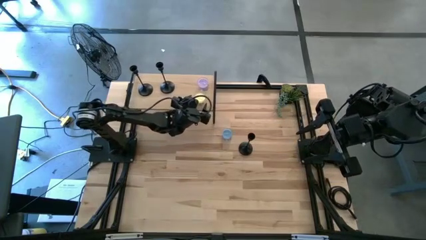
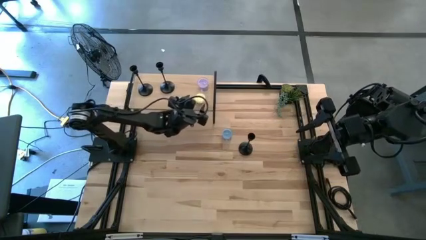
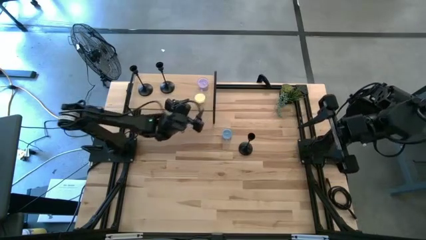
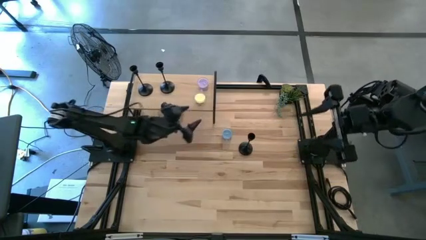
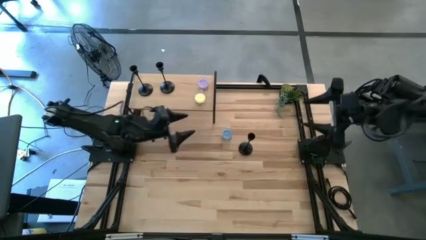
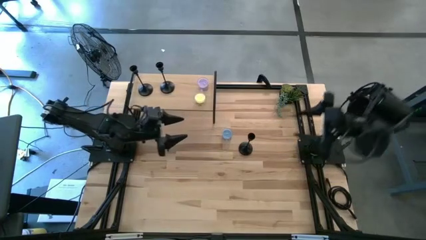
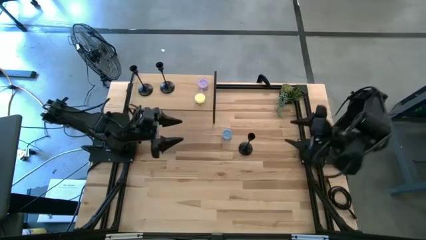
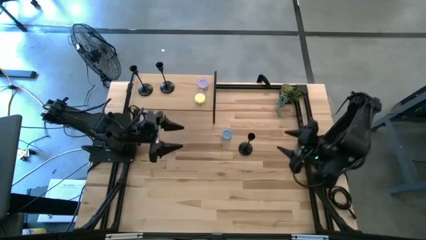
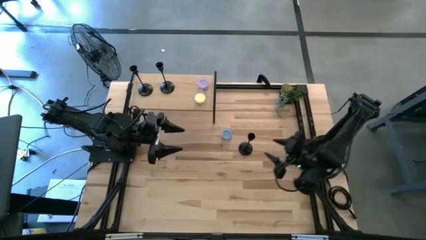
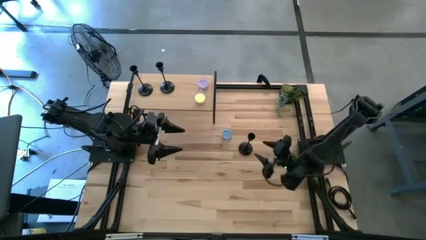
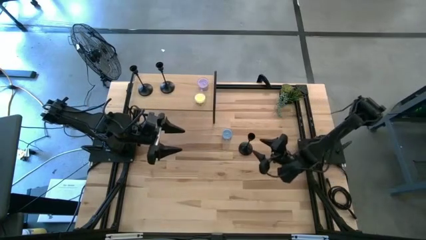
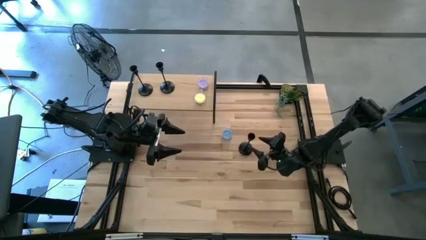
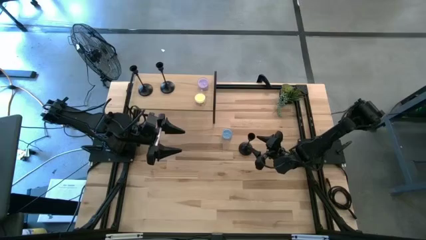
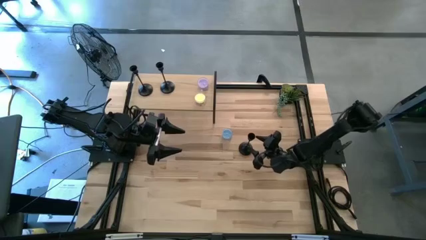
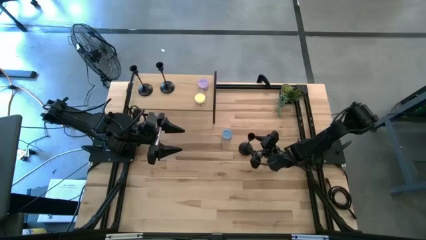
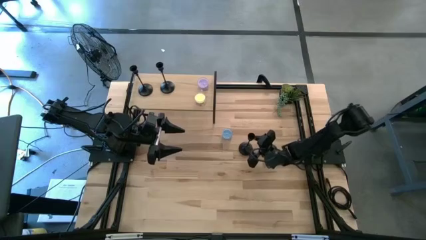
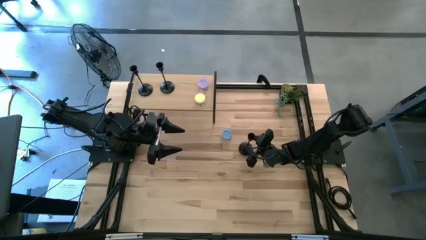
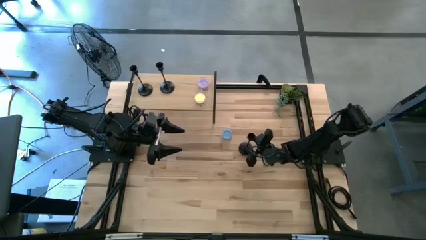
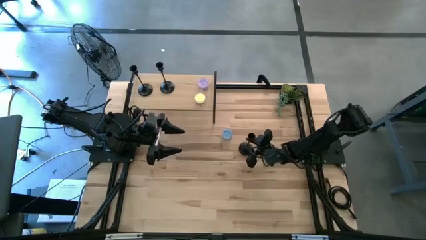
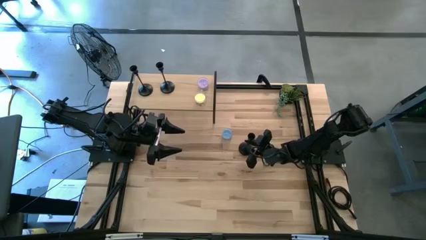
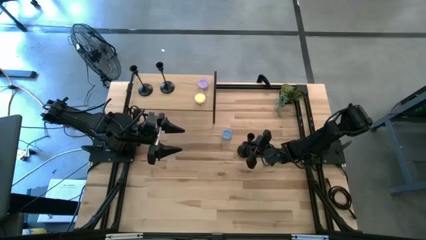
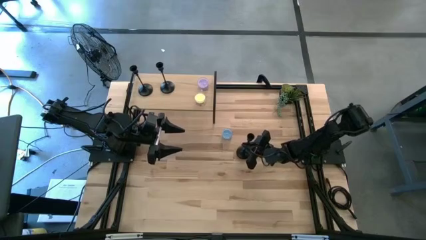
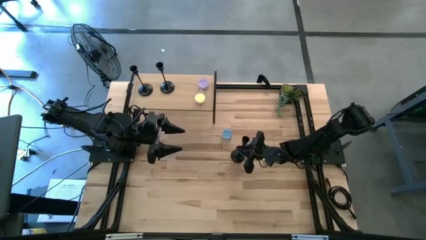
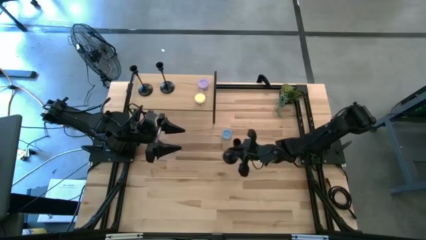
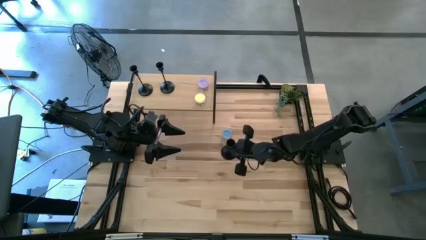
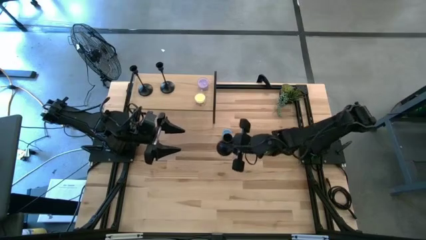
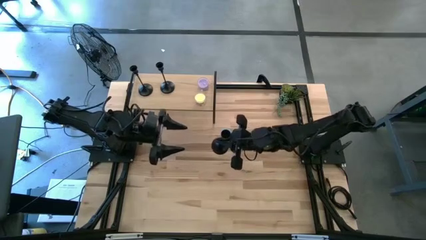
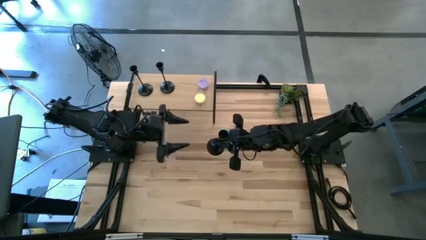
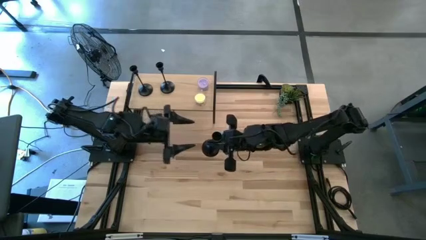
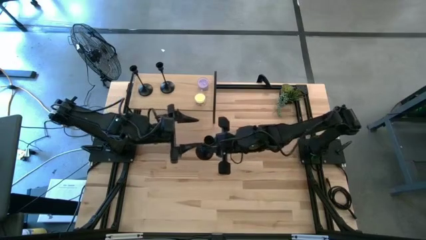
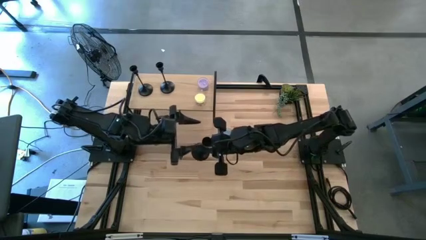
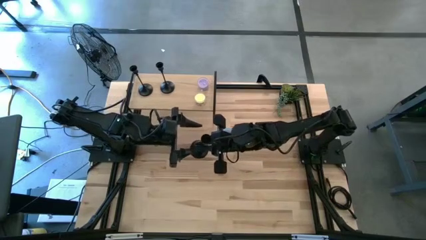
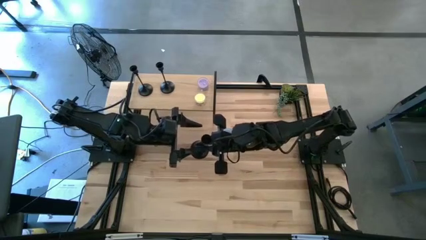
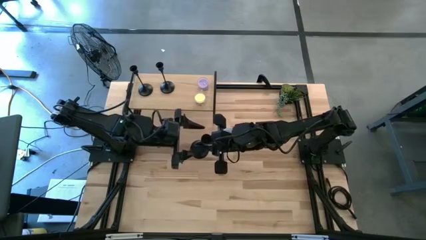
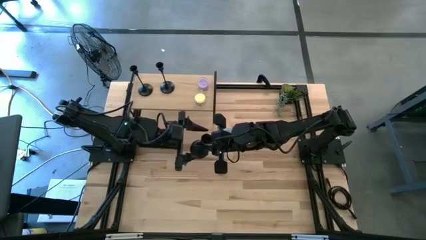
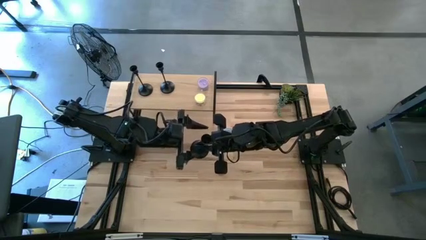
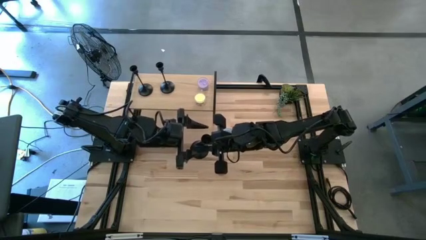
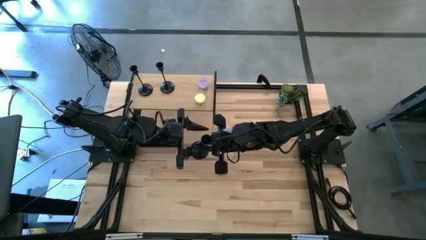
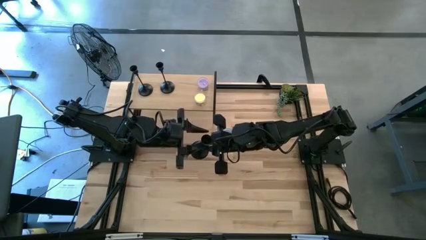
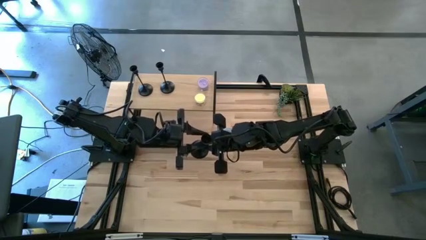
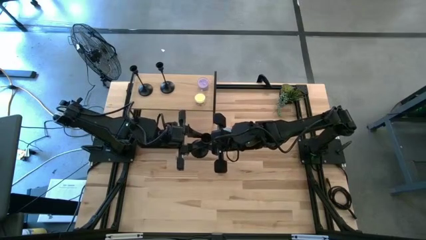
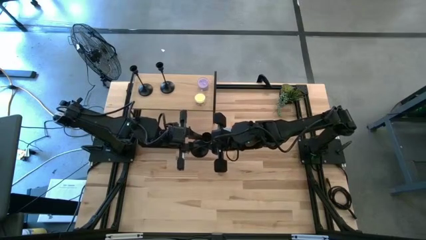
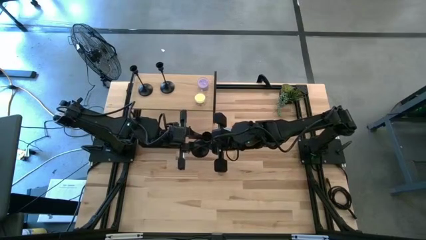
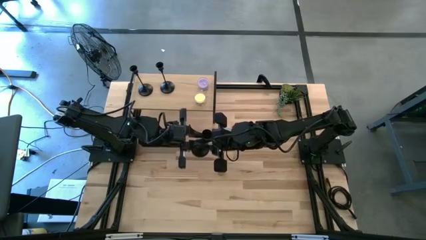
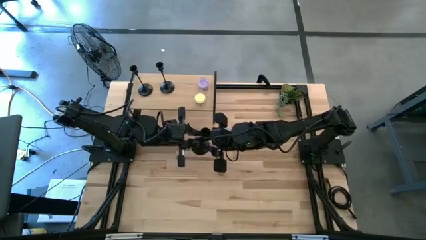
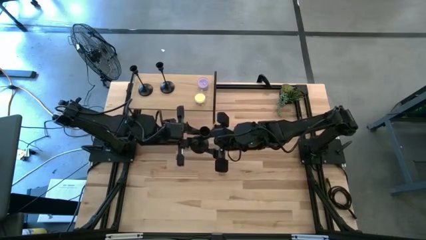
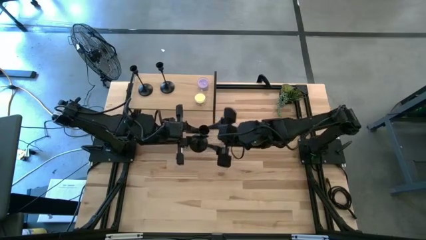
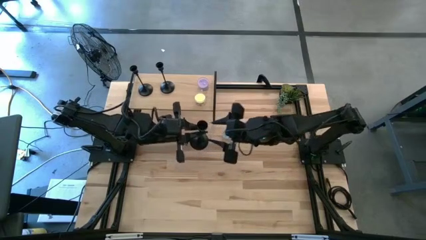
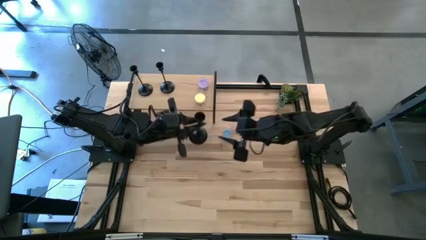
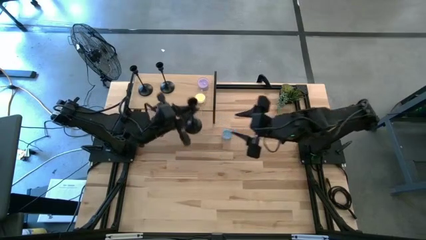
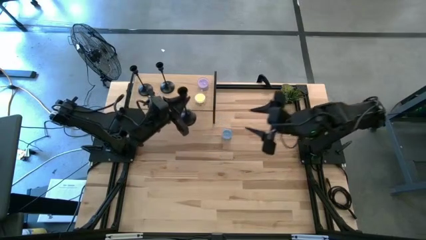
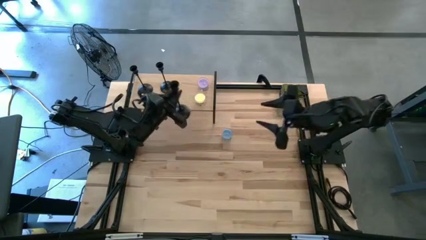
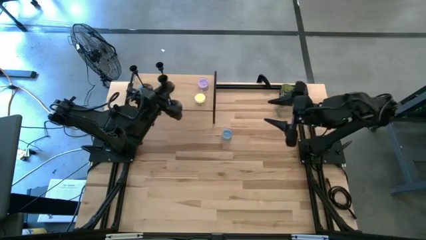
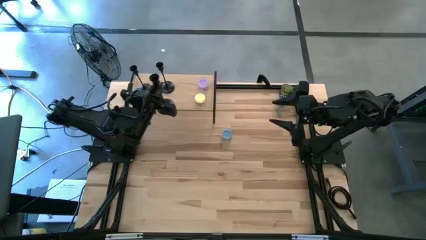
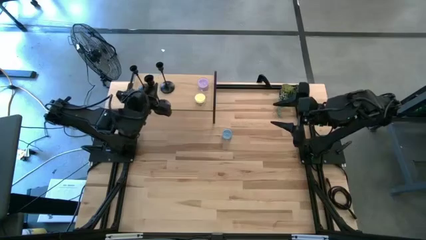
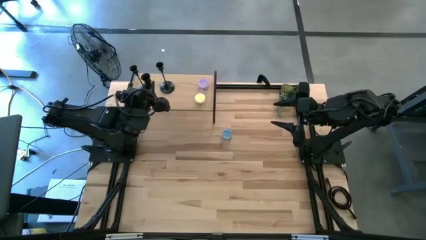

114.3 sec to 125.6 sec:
Task: Pick & Place candle stick holders
Put the black candle holder on the shelf

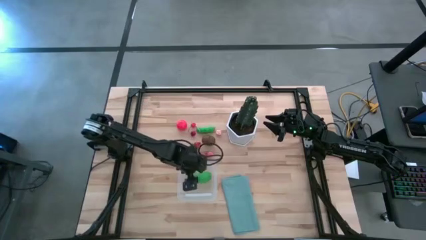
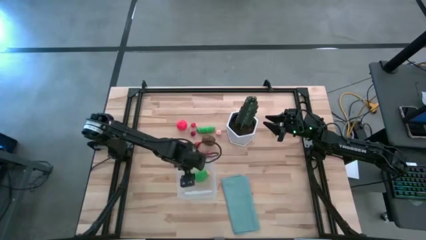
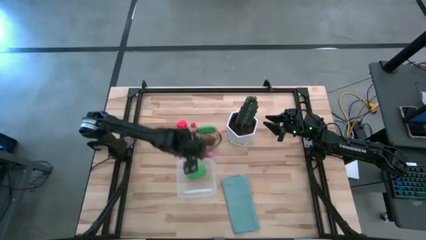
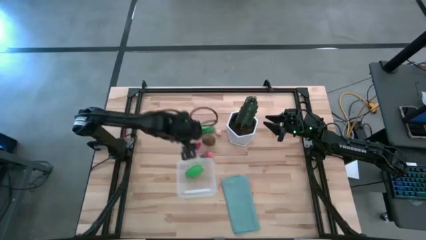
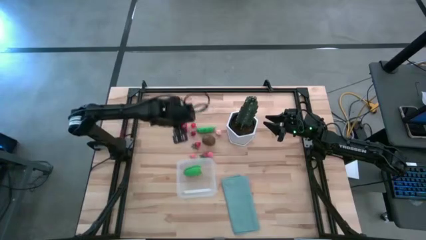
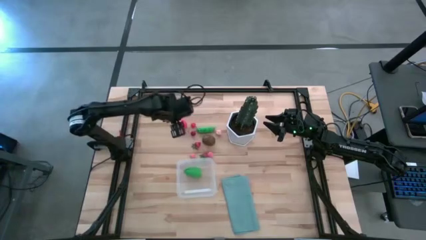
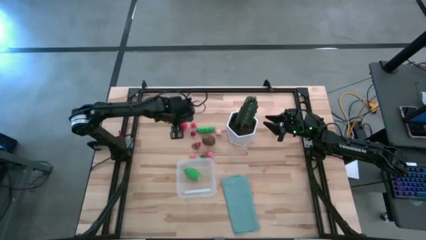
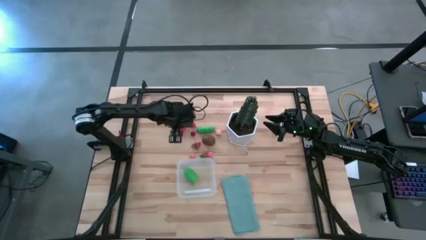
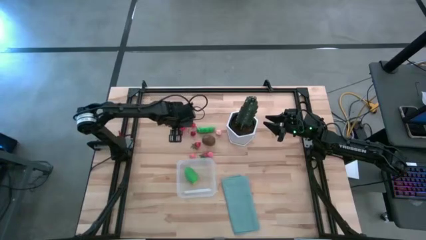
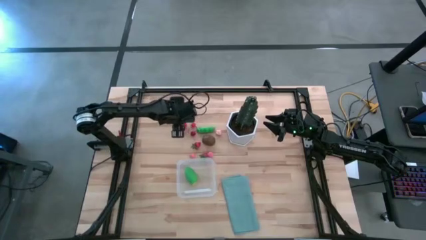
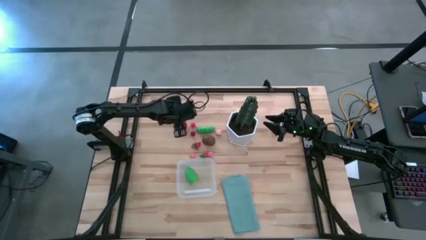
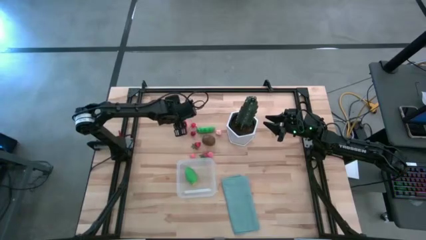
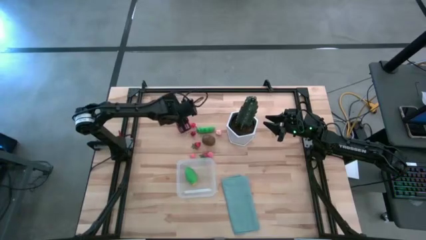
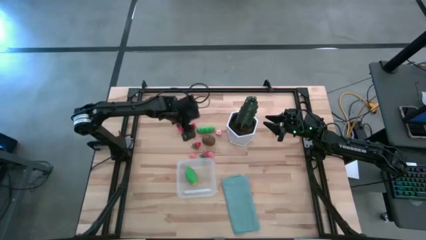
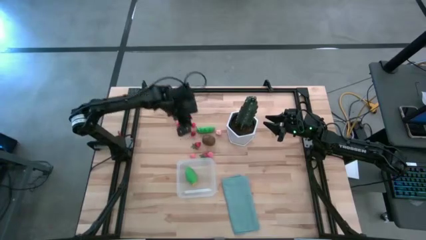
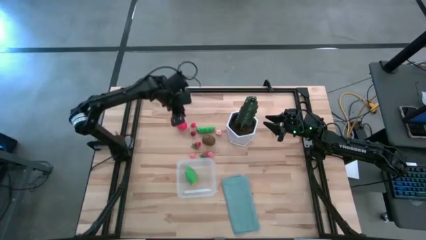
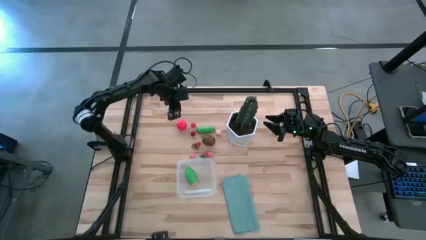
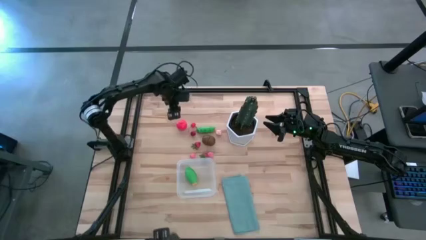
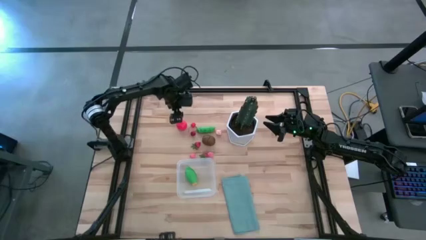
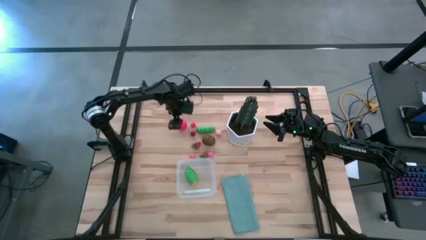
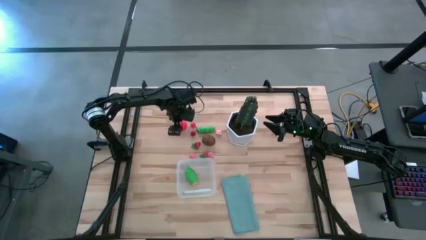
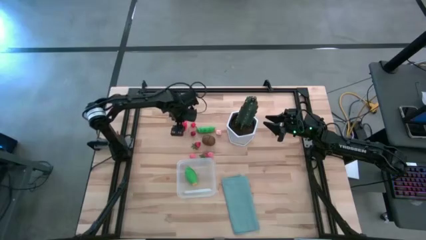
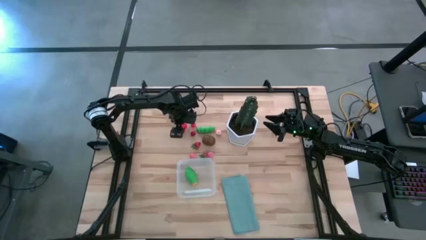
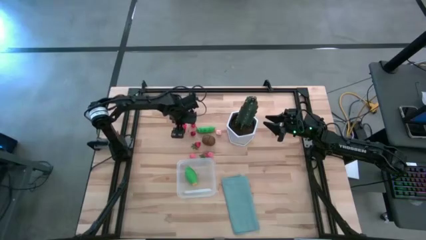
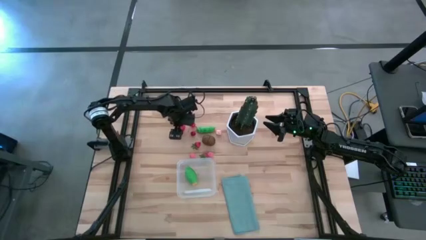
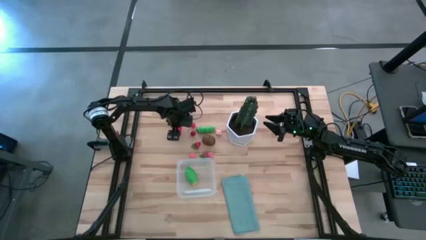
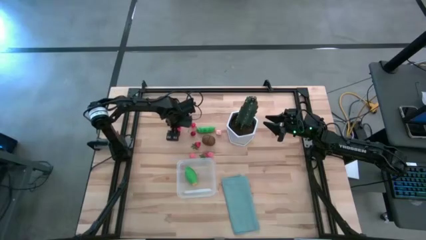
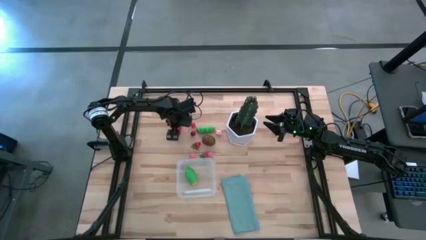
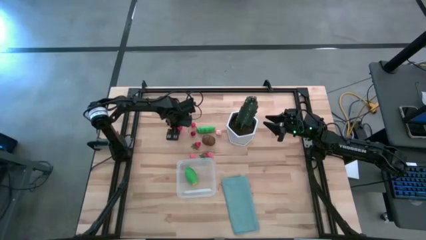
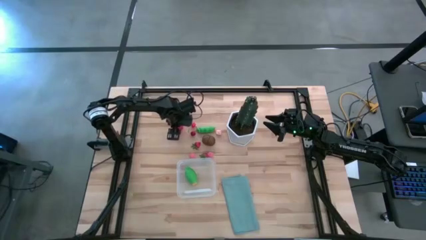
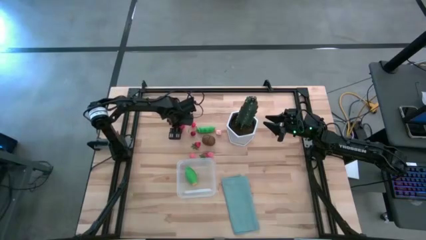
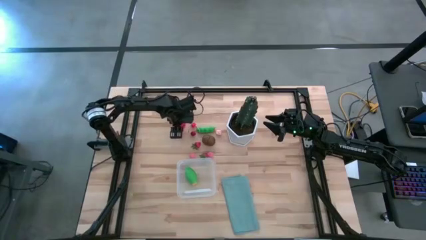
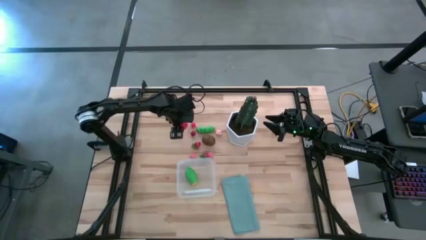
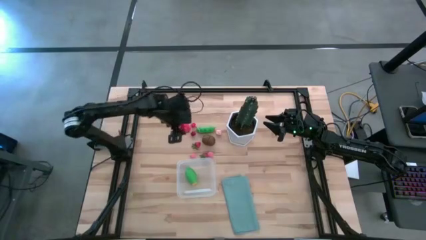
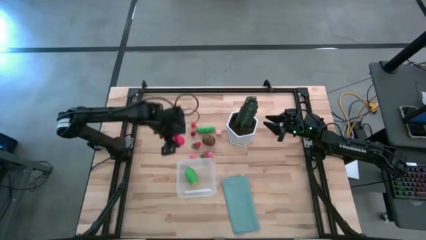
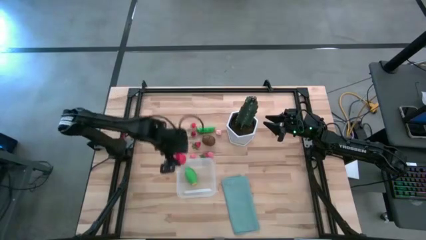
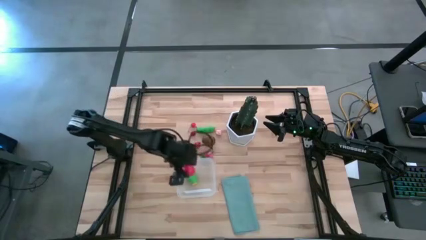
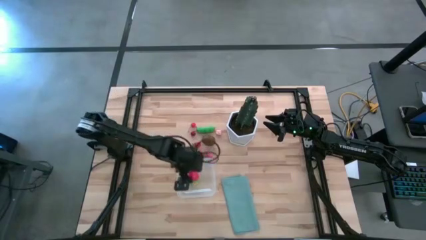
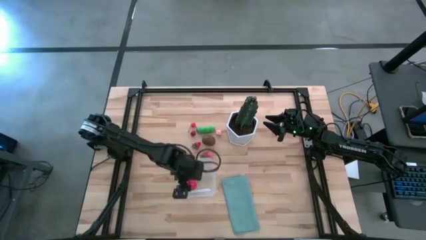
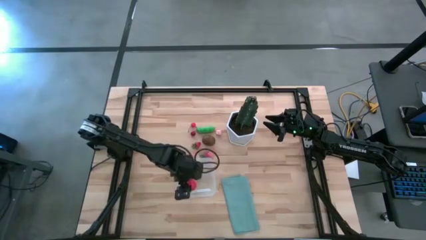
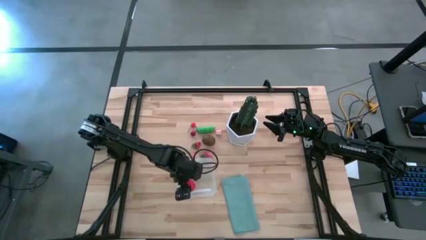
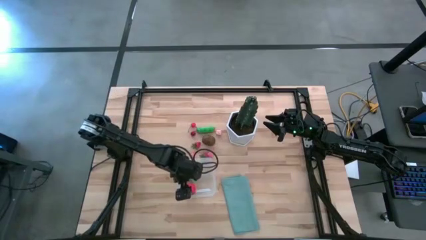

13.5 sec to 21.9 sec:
Task: Pick and placing Produce into tupperware
Put the red tomato into the transparent bin
